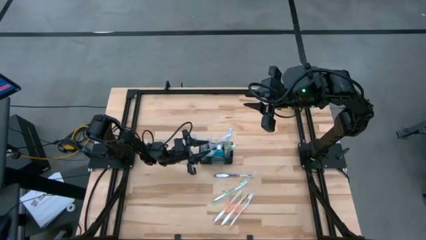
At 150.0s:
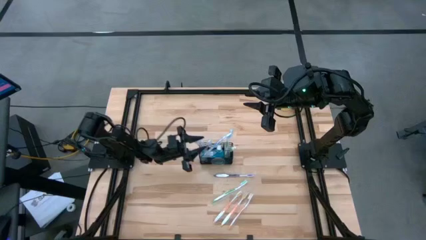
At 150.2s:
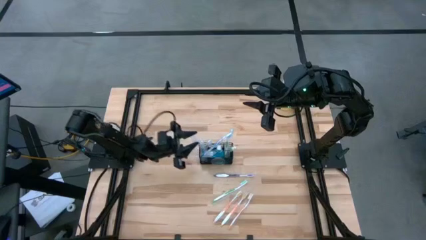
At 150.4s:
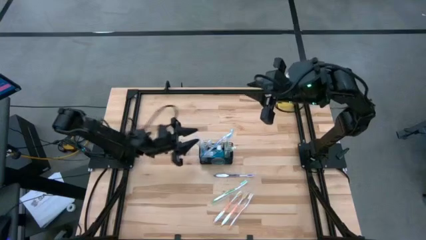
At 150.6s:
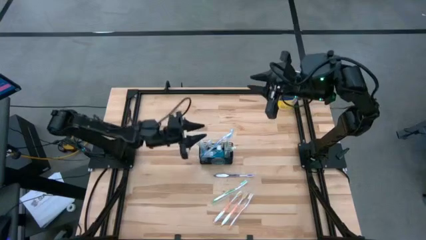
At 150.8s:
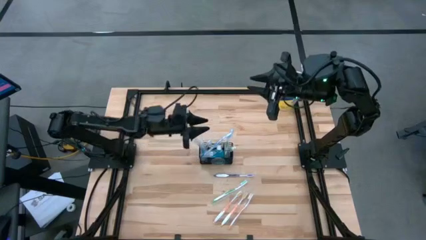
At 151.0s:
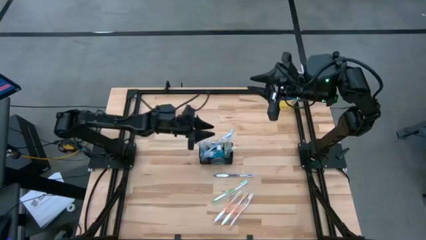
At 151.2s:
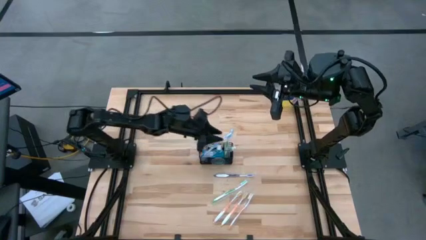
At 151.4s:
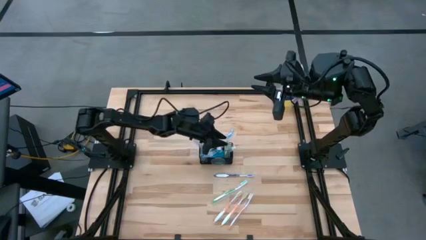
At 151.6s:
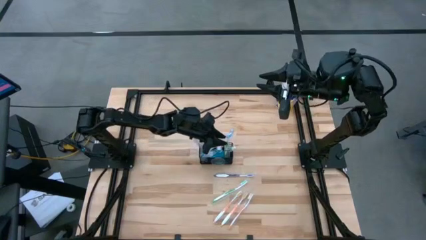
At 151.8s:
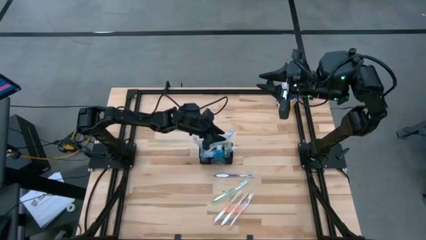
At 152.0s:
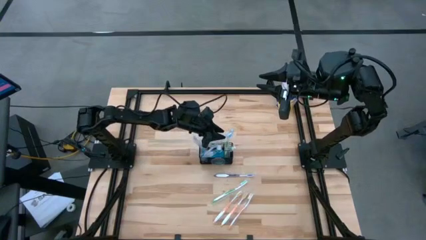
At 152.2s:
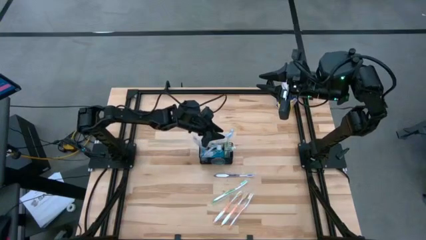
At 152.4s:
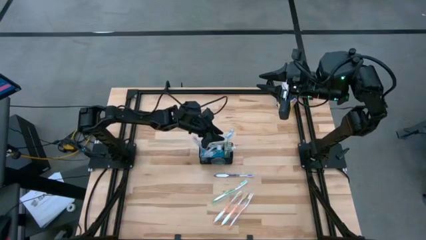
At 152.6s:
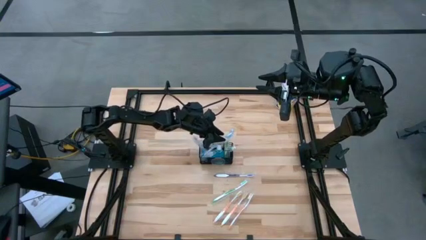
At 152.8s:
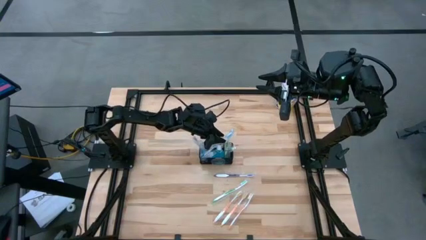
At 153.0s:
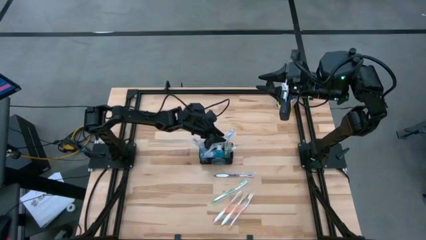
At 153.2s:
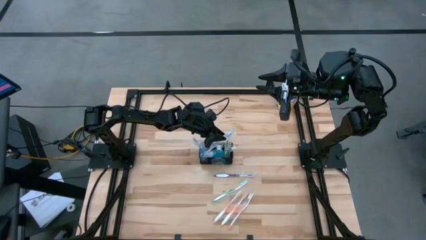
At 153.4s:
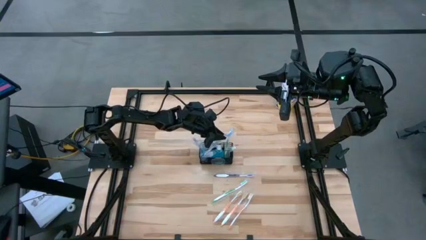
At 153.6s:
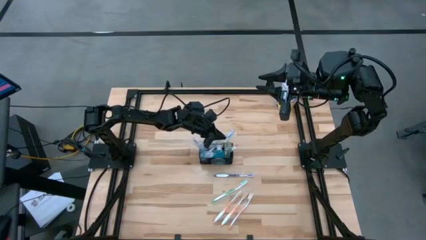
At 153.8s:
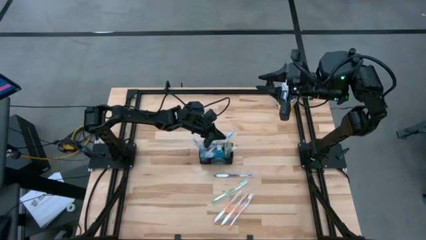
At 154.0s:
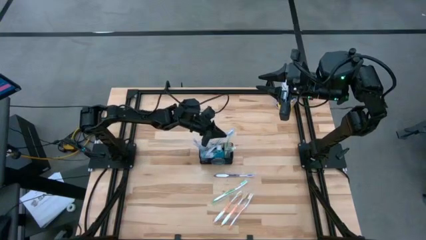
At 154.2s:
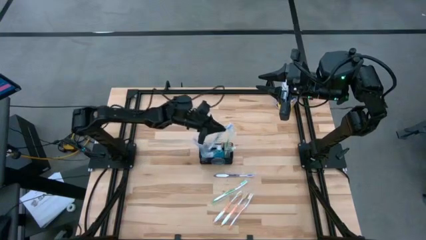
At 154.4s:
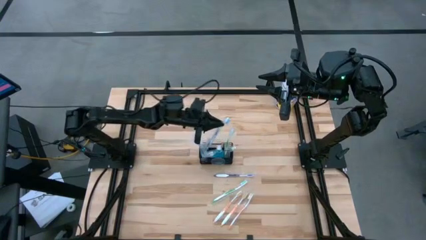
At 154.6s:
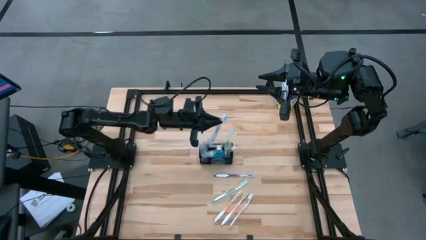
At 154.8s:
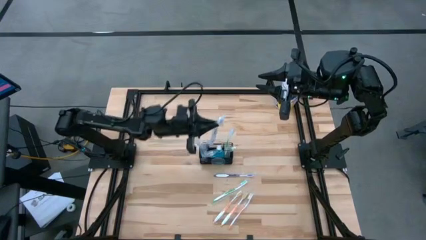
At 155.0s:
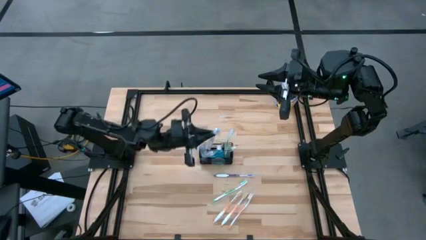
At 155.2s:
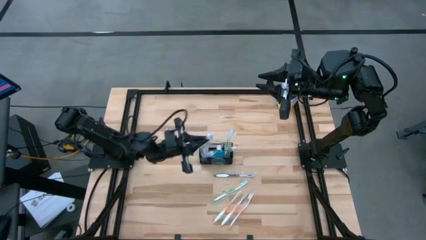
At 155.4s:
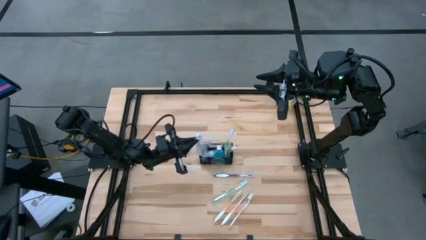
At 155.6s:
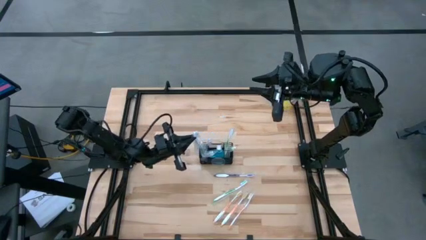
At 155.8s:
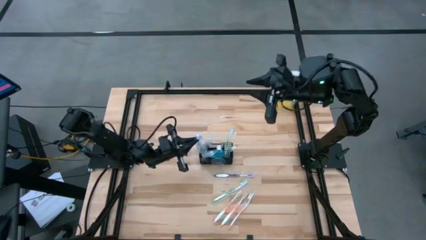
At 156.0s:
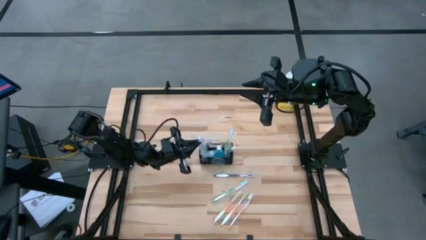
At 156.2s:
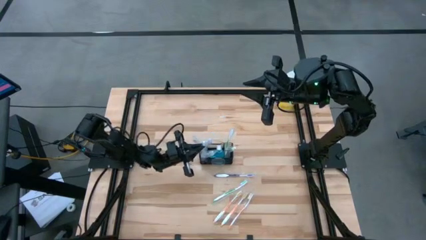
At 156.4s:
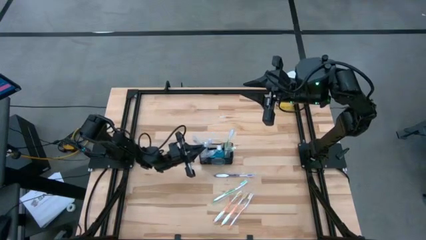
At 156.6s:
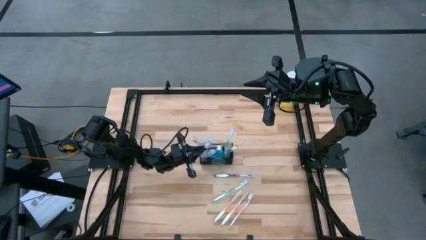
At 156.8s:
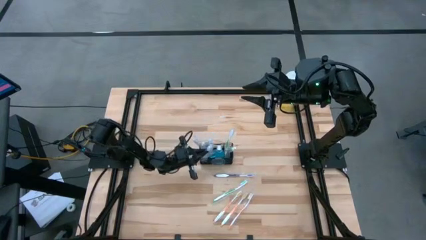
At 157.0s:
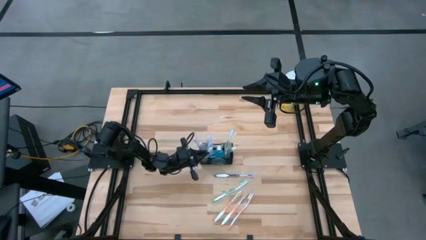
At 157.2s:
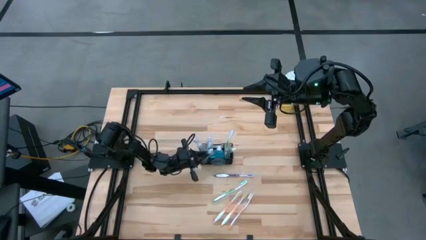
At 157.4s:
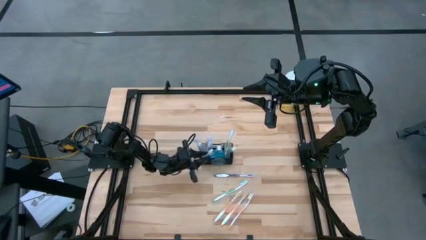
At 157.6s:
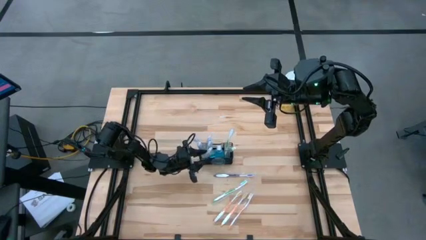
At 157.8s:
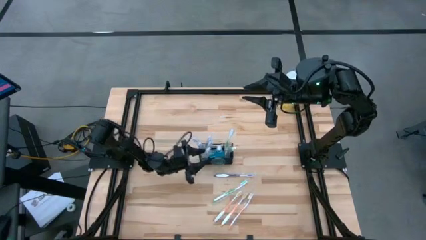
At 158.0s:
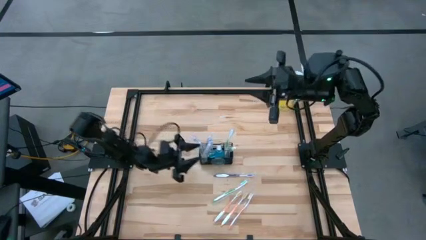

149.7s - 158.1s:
Task: Pick & Place toothbrushing station
Put the blue toothbrush into the black wire organizer

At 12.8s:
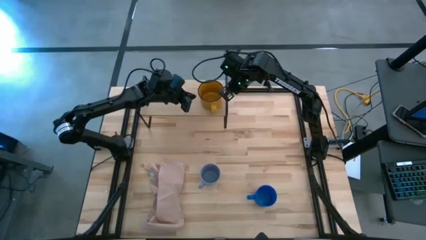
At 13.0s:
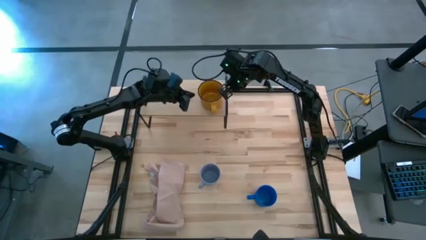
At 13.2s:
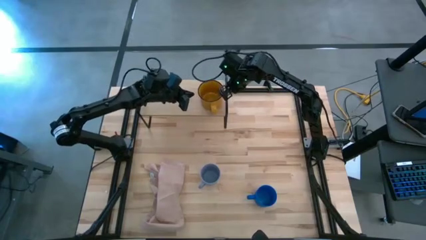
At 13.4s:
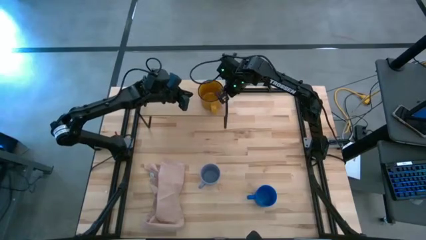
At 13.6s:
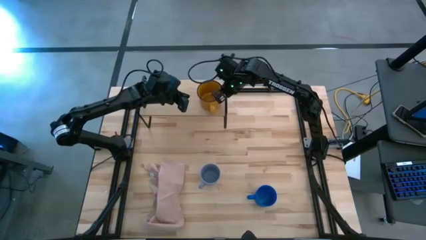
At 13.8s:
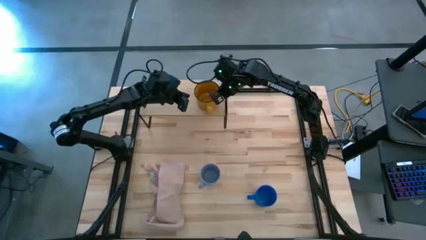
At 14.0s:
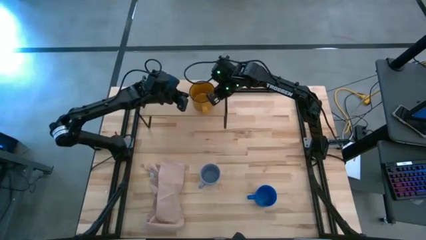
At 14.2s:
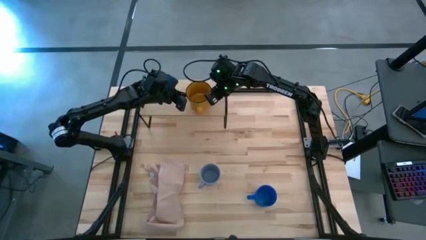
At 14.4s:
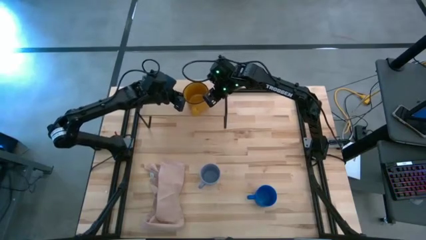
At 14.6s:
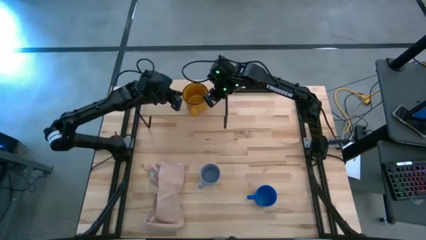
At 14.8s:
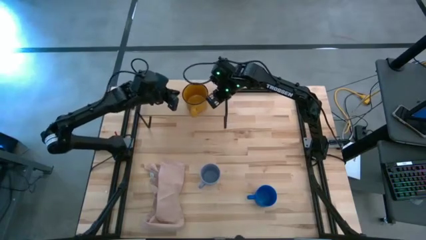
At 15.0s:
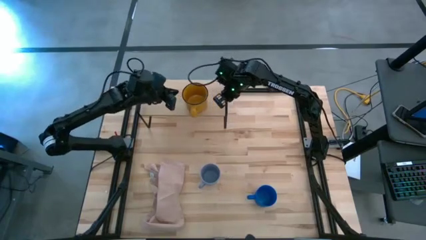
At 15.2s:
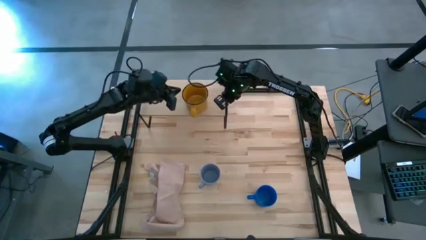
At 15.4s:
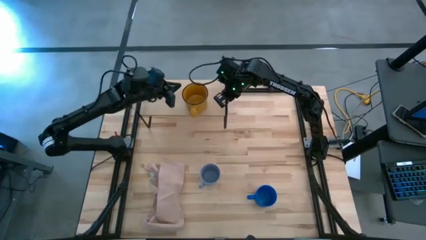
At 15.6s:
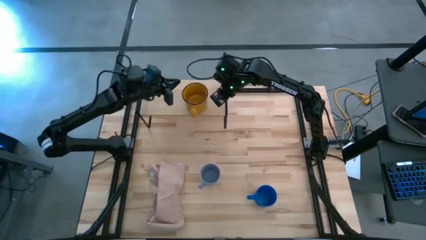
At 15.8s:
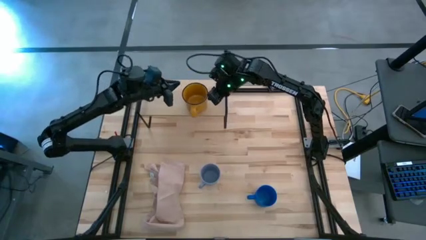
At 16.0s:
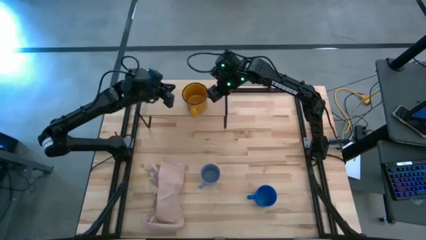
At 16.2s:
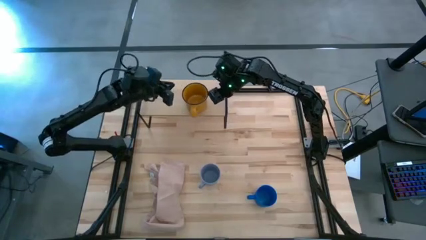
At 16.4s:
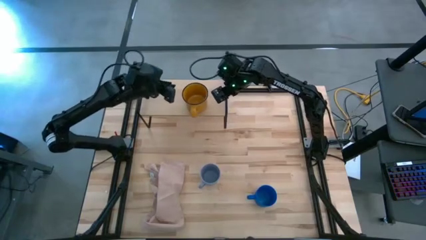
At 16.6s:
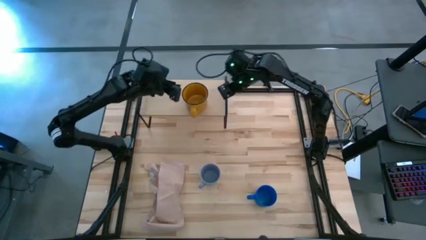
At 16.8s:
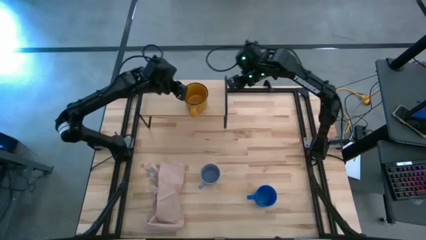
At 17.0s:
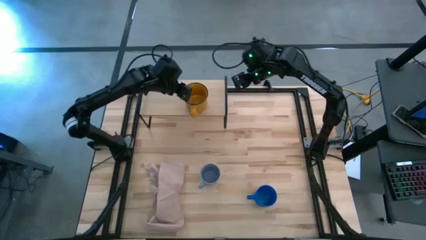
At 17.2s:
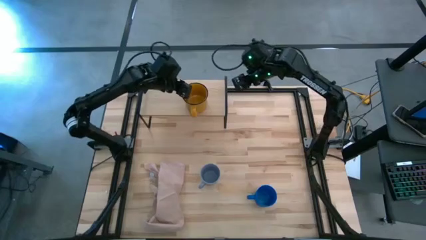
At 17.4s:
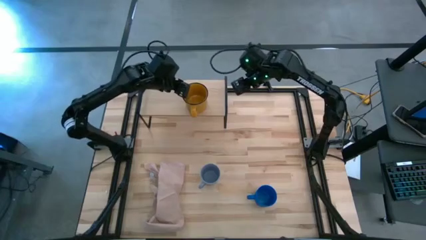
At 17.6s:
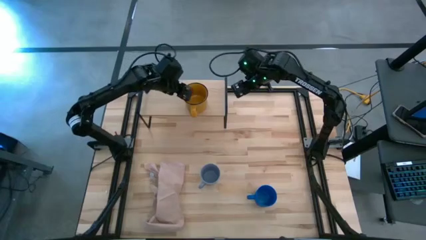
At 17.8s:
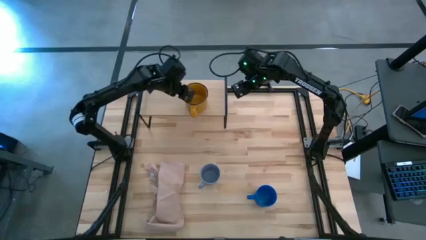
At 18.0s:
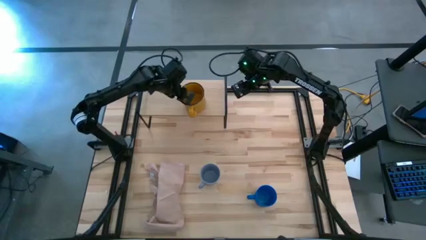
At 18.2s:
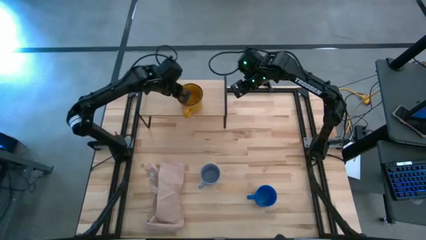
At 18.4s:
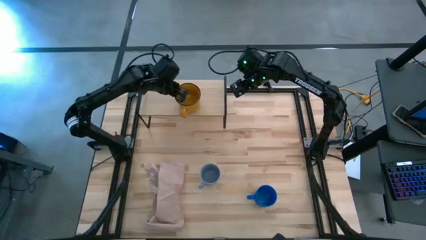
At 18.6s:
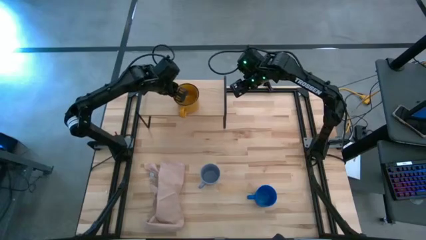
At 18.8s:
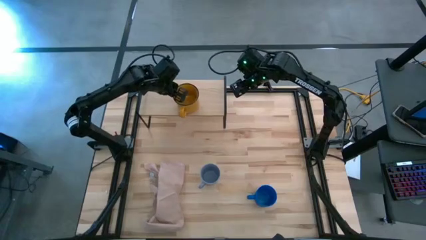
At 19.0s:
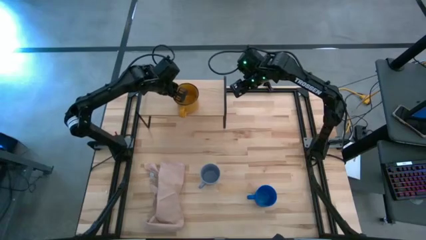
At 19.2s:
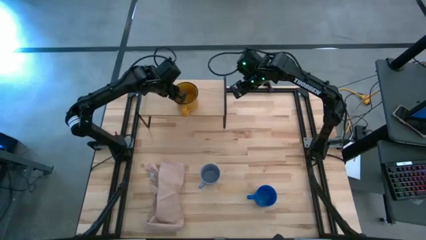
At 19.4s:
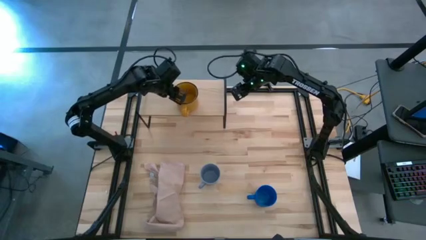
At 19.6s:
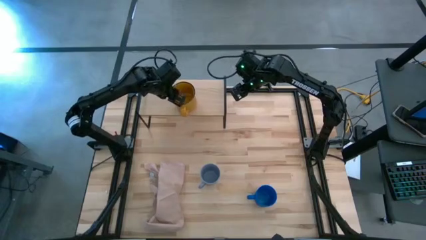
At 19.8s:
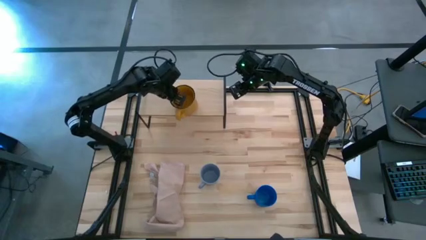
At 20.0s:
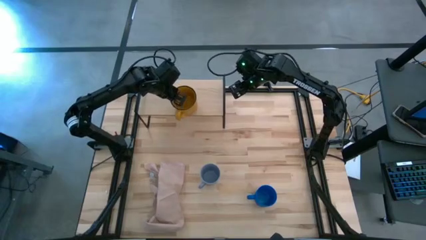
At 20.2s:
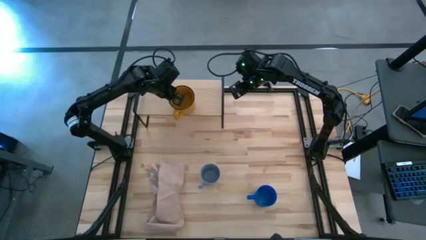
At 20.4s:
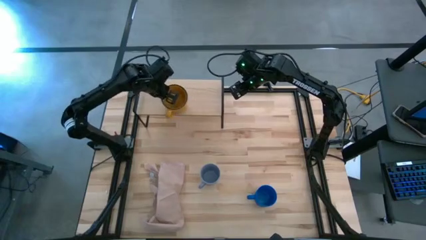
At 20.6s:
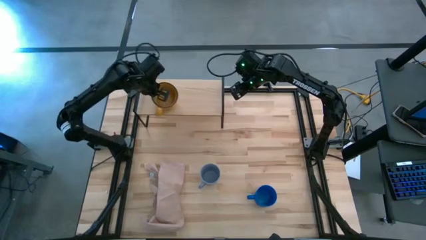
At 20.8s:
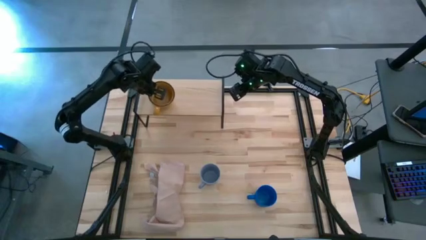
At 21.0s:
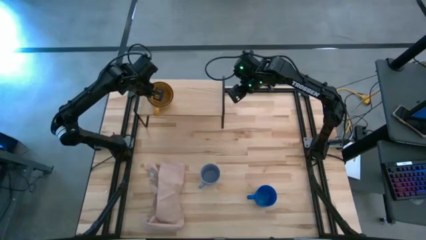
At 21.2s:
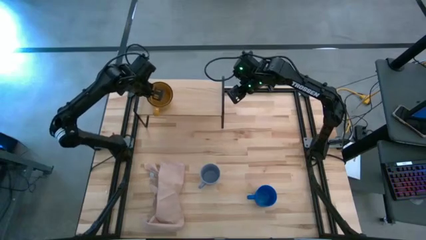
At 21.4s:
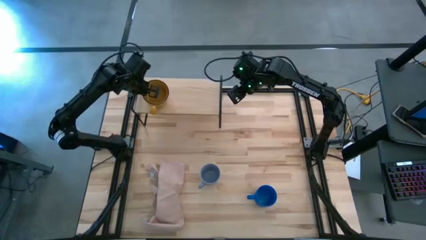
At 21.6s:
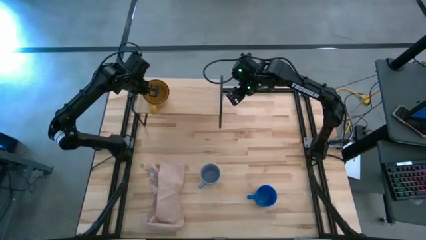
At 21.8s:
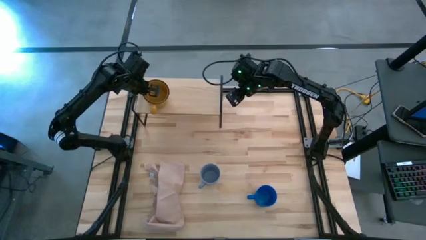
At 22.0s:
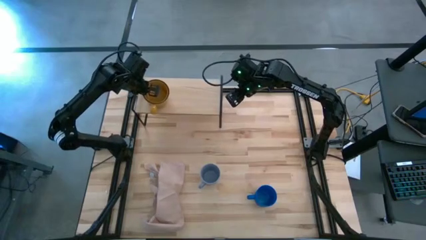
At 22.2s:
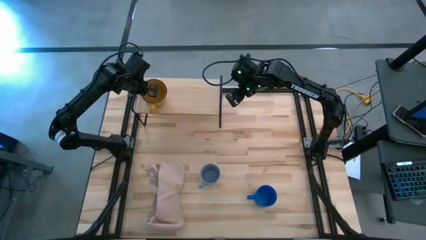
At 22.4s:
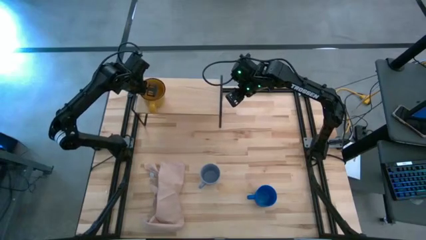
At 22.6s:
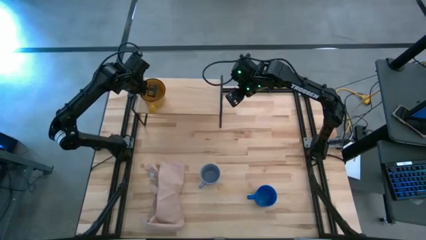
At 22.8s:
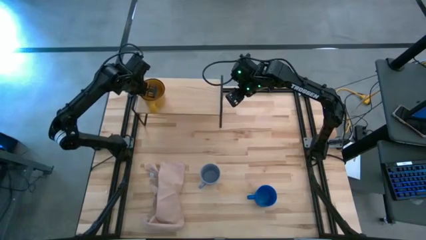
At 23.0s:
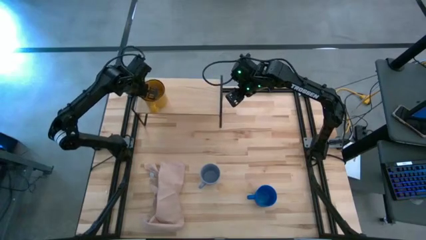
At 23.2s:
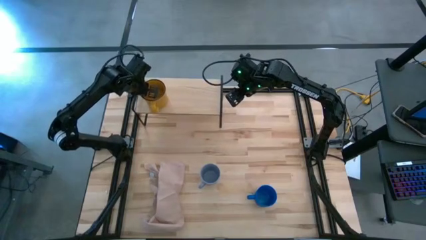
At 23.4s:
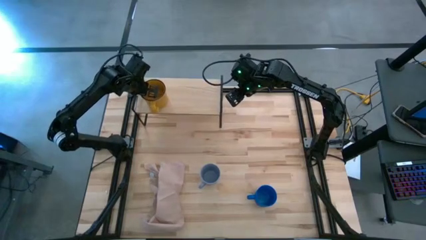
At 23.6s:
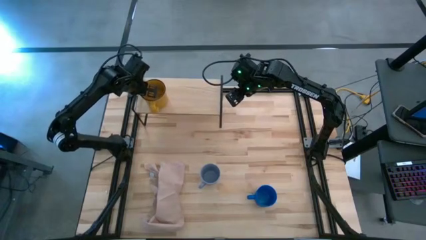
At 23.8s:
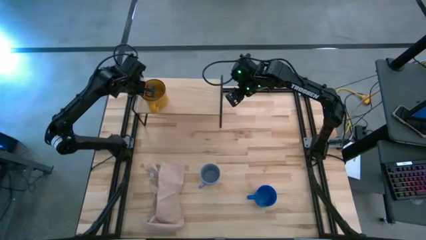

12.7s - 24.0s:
Task: Stack small to large cups/mugs on shelf
Put the yellow mug on the shelf
